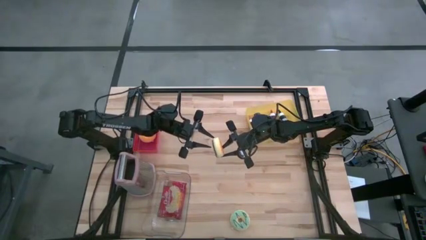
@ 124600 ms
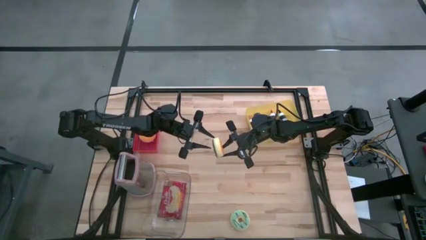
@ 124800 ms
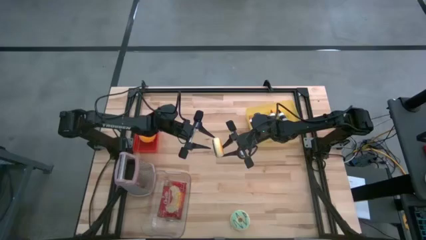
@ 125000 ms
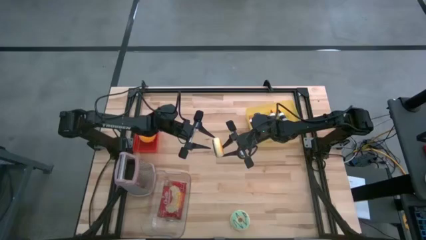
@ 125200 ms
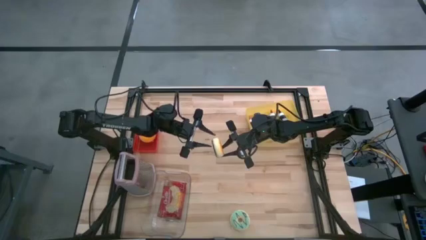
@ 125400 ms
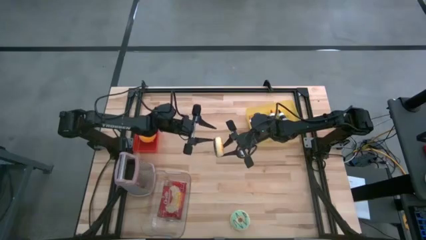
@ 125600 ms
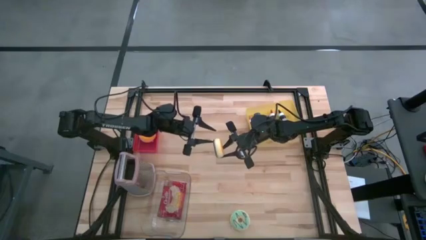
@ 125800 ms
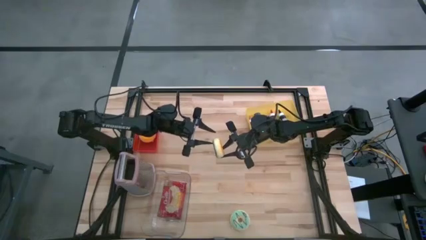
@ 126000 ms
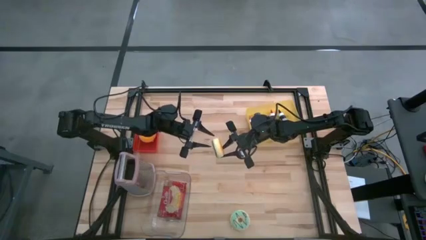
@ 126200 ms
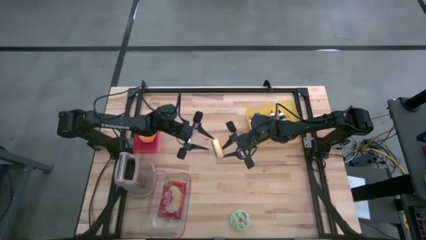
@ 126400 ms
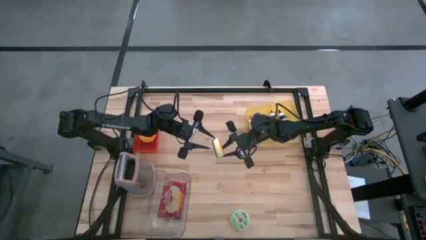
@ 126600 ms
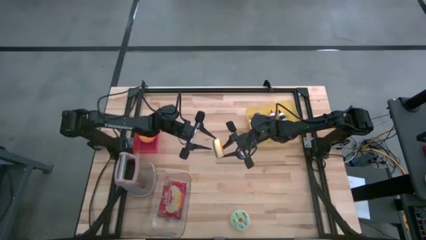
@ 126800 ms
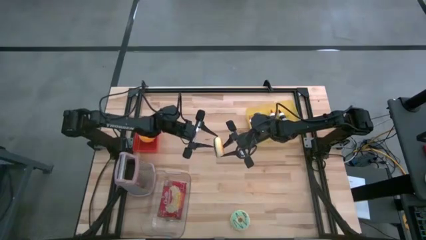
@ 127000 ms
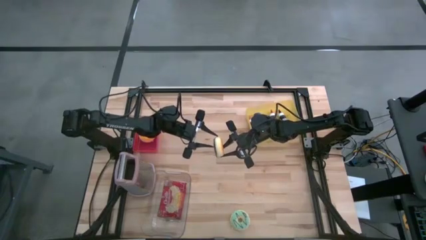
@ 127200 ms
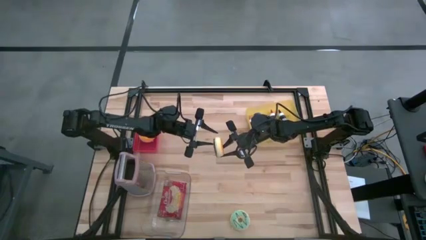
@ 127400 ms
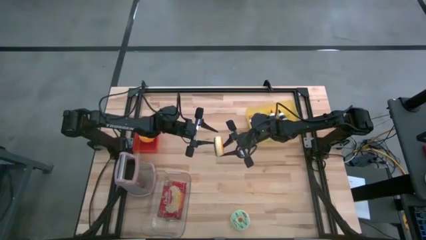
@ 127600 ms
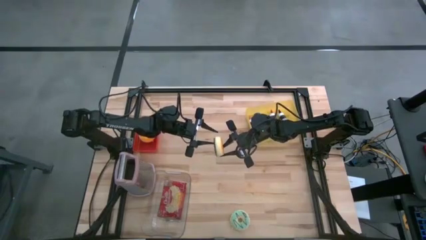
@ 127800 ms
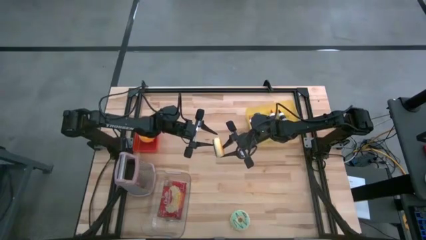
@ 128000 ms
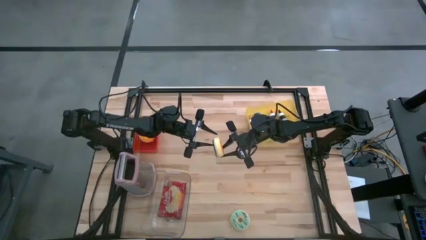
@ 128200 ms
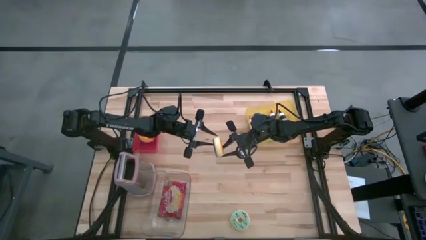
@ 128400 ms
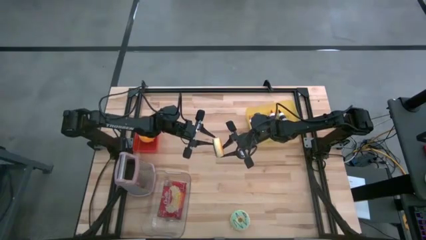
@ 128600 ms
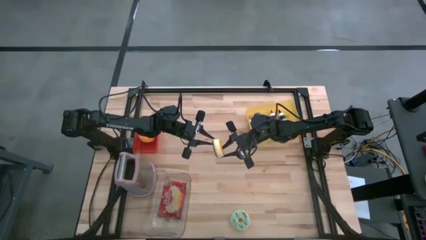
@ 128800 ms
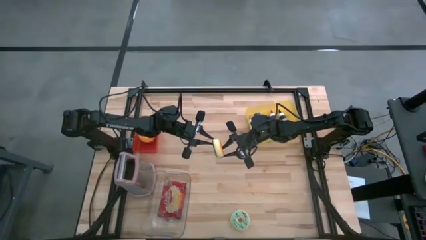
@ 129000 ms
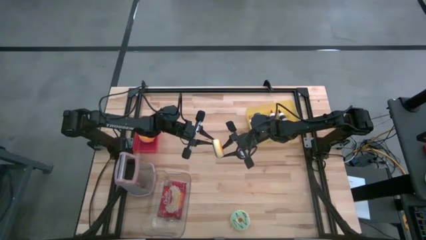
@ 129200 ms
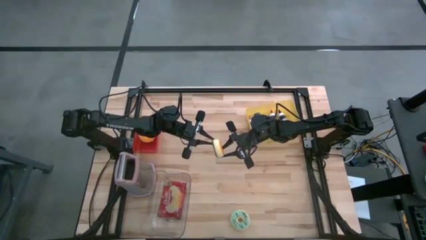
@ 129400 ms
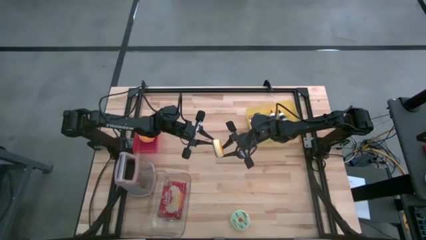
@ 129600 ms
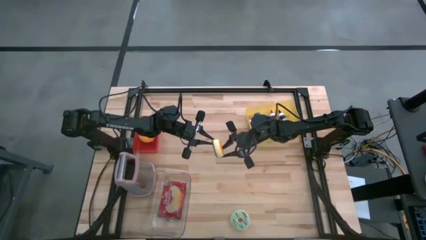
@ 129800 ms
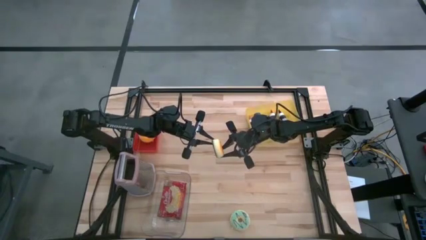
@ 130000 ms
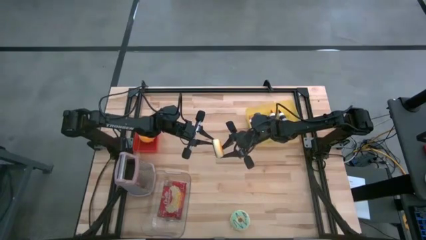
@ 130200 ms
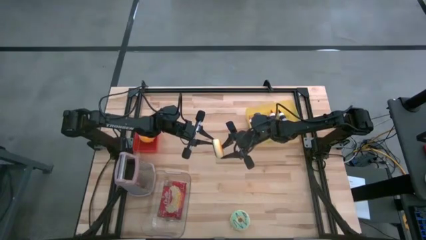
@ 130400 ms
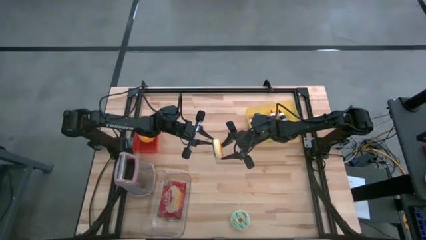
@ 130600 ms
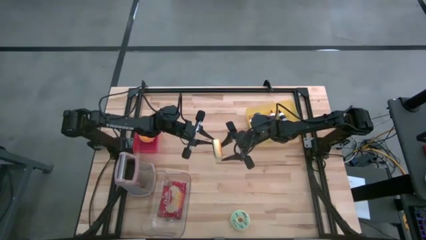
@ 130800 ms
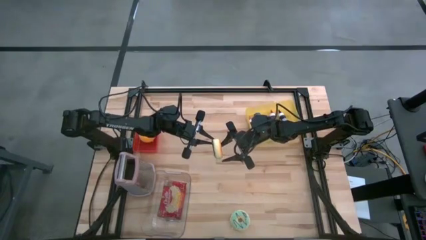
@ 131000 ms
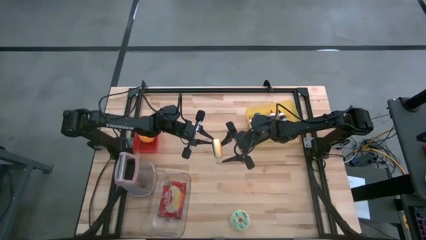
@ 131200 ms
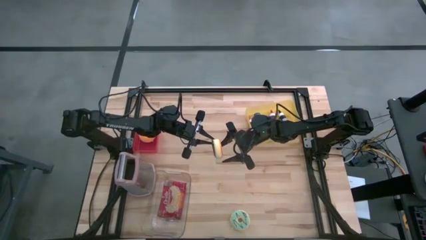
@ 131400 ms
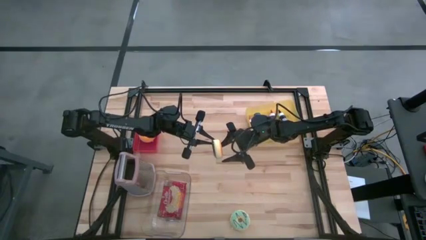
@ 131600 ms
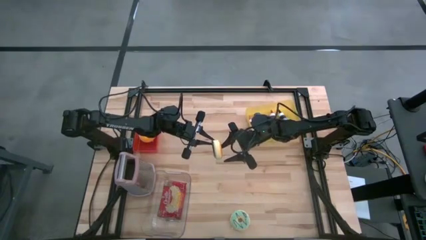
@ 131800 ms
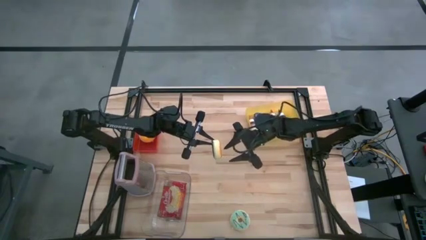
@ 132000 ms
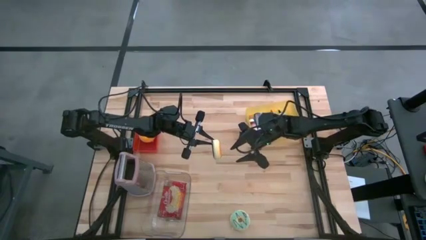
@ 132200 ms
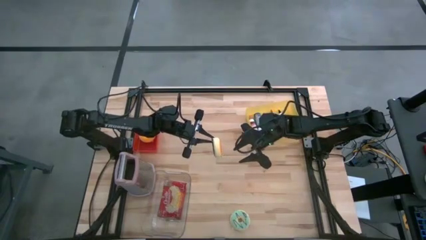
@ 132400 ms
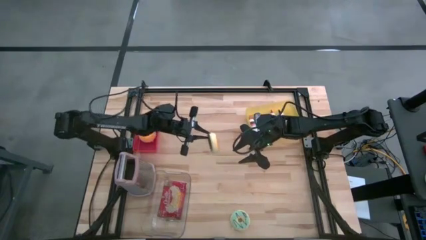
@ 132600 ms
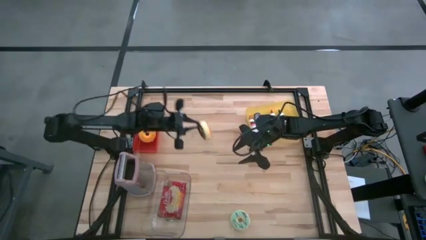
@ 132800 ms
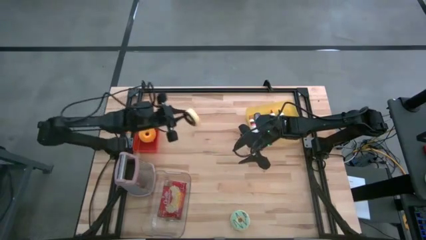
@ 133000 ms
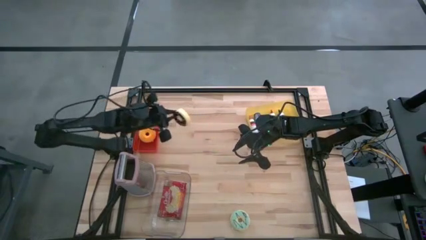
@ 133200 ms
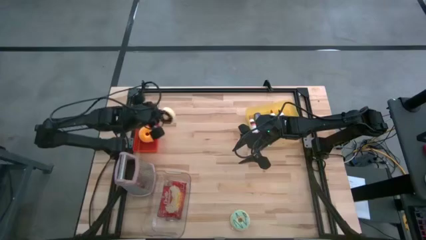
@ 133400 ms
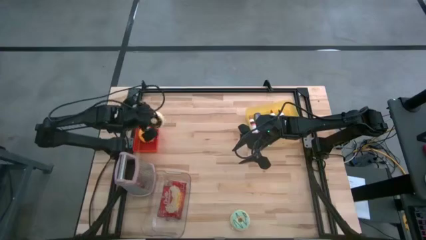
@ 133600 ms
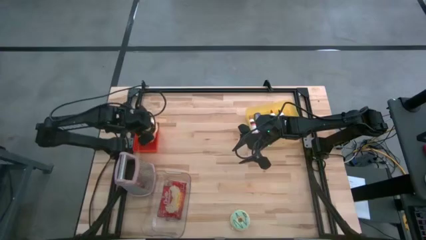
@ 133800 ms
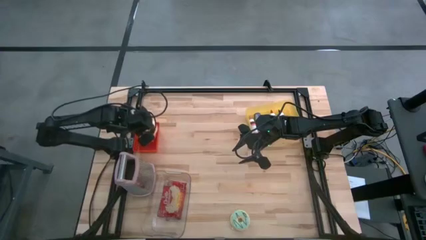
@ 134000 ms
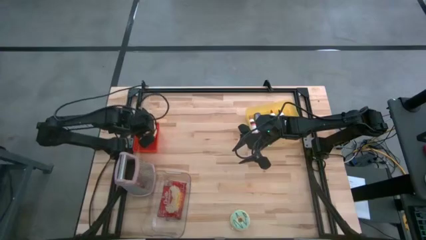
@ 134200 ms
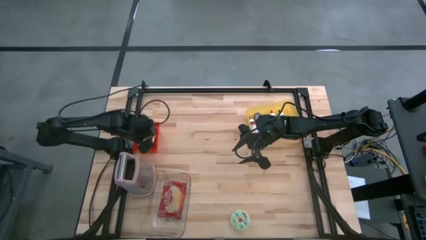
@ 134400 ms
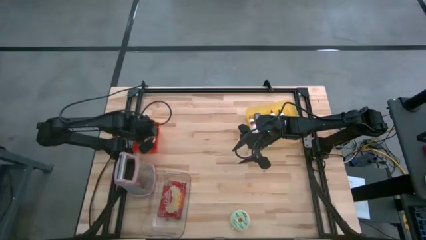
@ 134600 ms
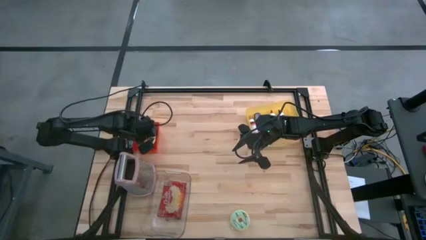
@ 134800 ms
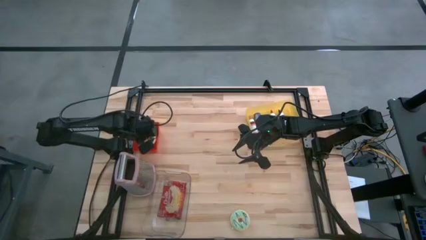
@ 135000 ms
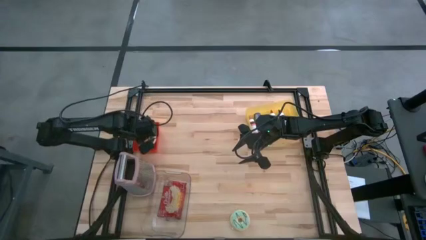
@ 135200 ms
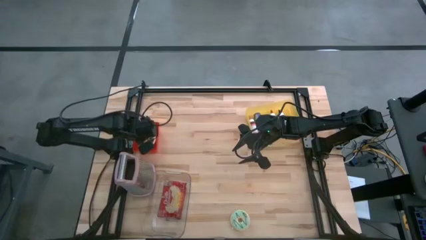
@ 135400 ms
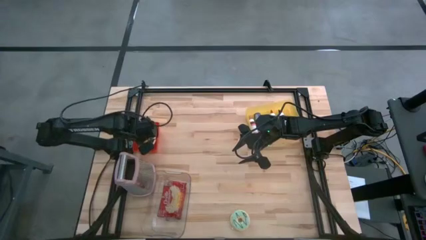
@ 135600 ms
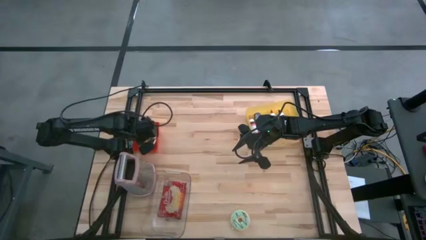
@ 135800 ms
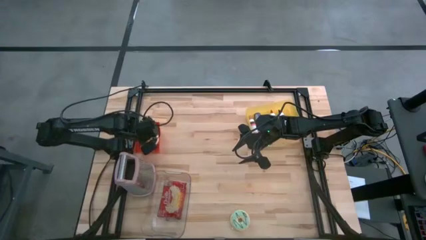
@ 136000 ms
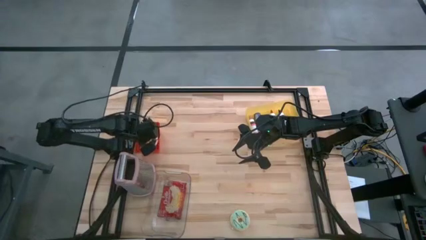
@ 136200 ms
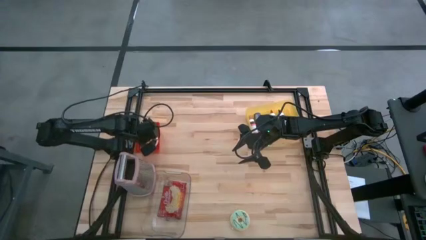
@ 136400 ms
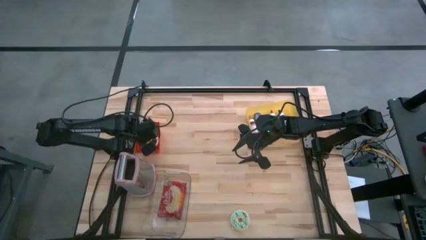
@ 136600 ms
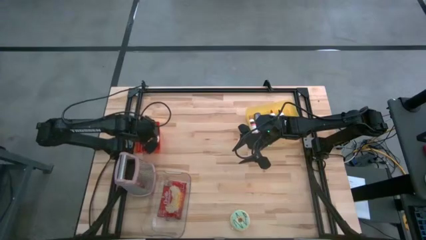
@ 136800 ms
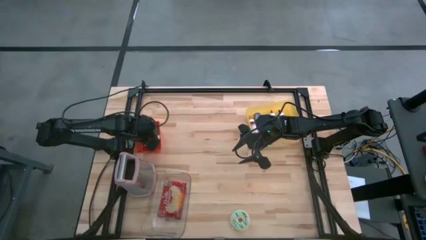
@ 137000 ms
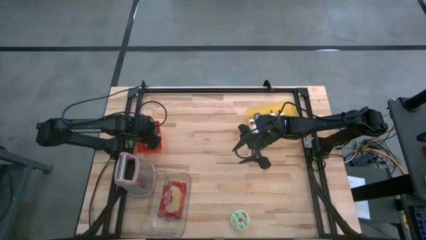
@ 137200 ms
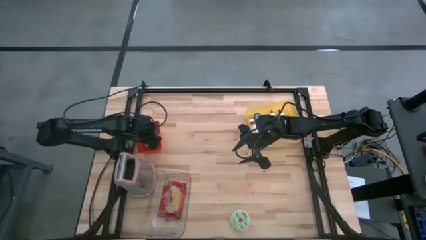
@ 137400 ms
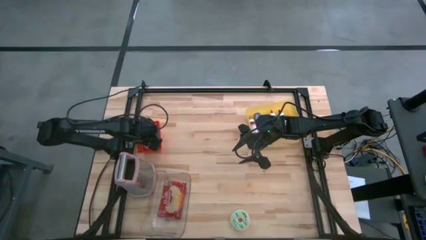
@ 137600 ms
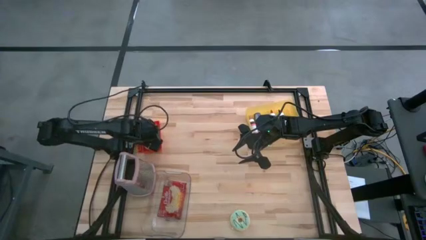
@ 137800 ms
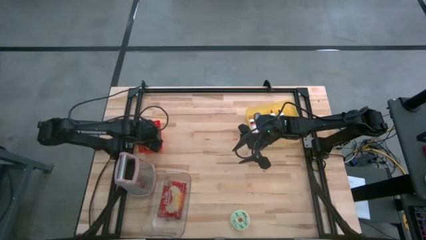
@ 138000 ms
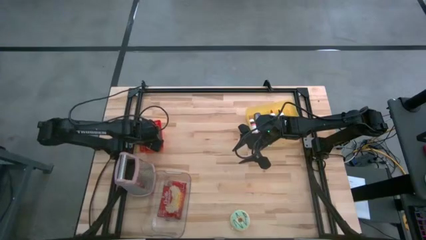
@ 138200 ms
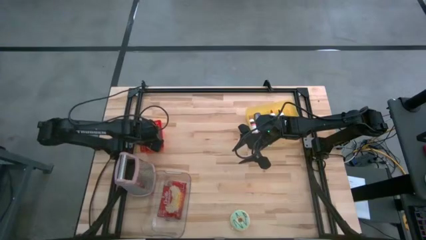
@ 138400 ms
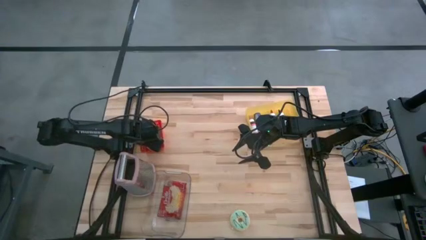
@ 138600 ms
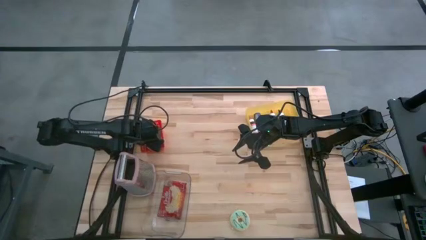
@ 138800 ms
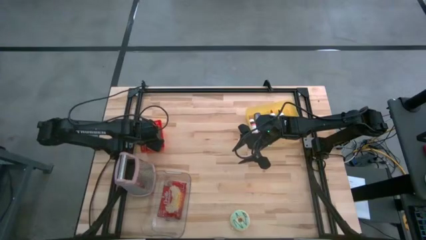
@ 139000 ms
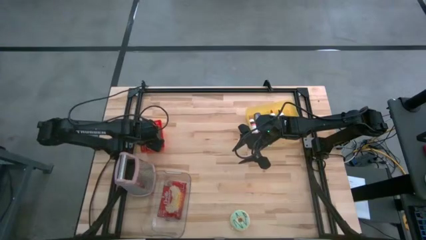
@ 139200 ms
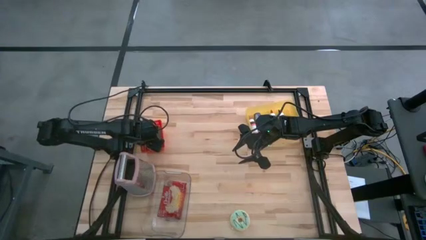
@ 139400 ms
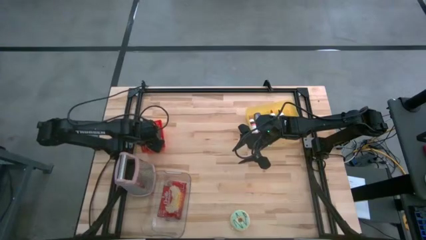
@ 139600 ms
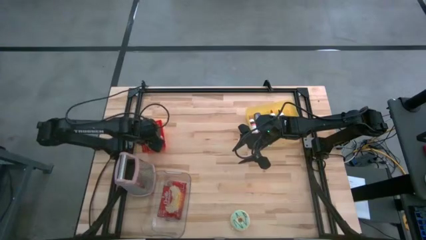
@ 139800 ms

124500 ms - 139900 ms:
Task: Pick & Place Food Item
Put the black donut into the red bin
